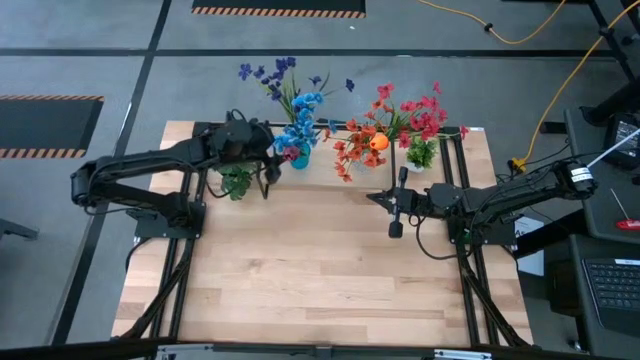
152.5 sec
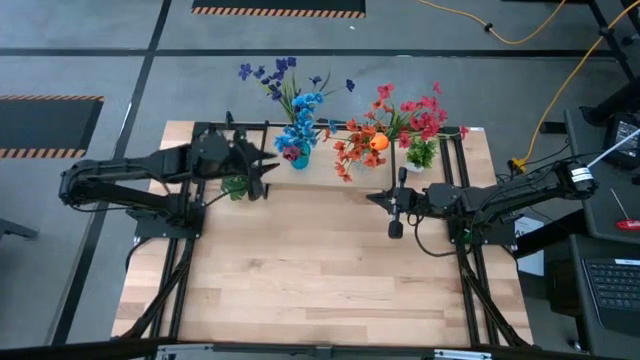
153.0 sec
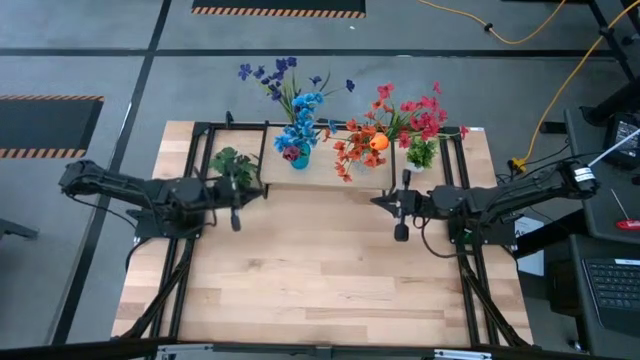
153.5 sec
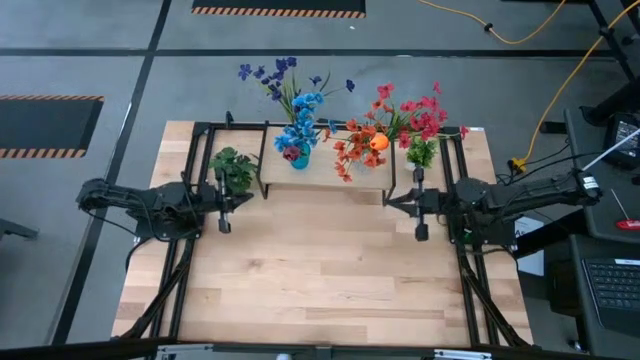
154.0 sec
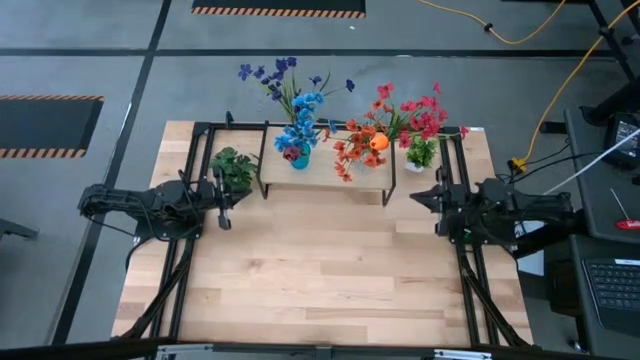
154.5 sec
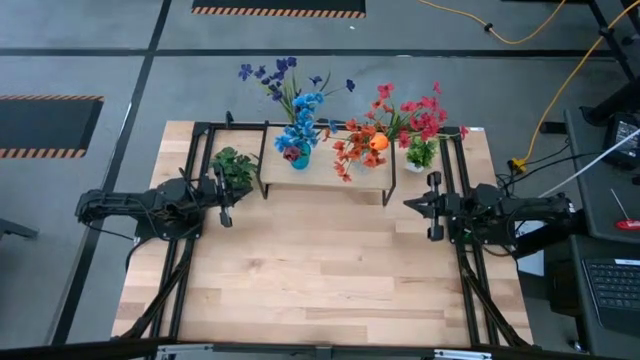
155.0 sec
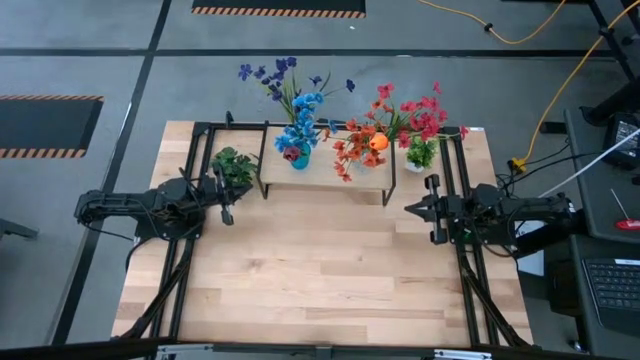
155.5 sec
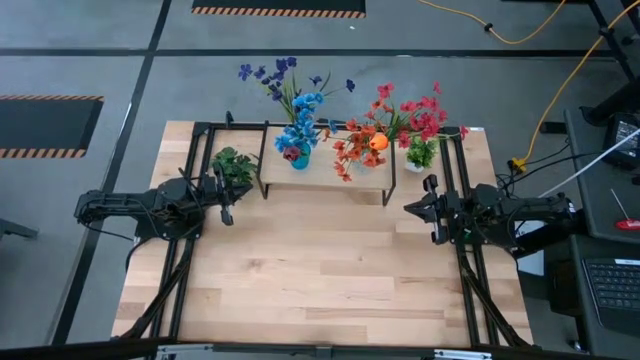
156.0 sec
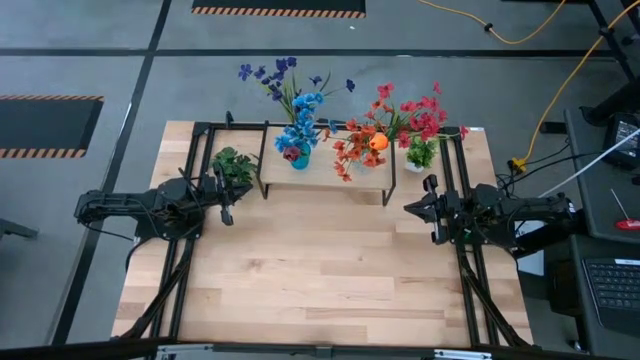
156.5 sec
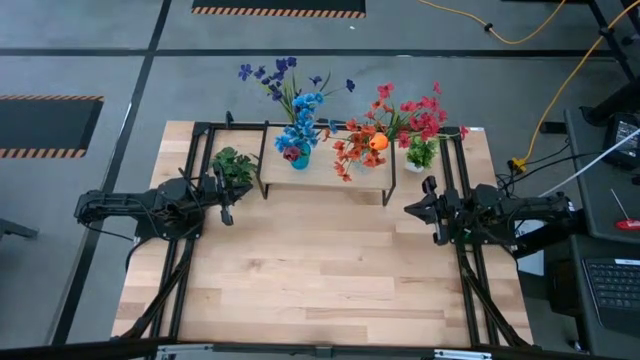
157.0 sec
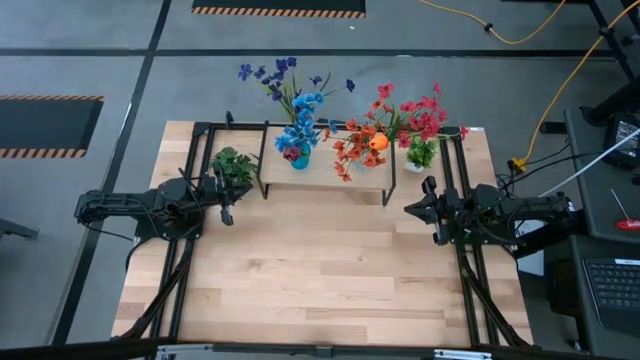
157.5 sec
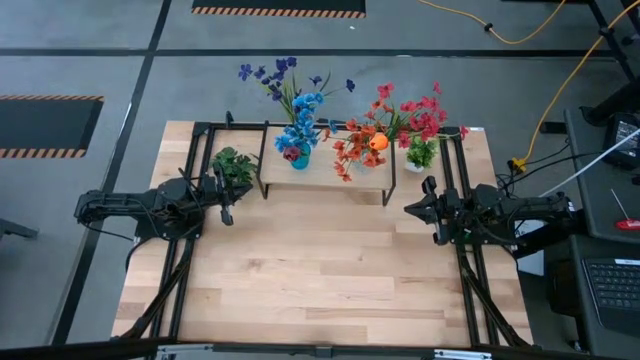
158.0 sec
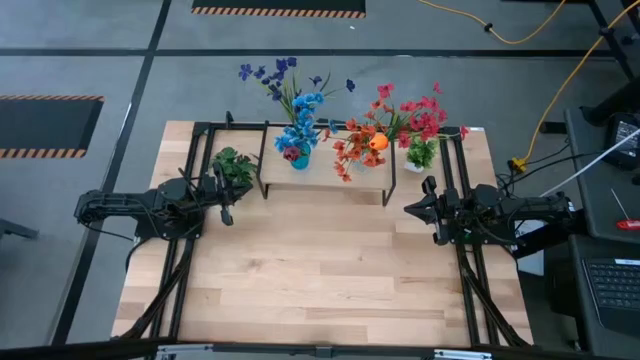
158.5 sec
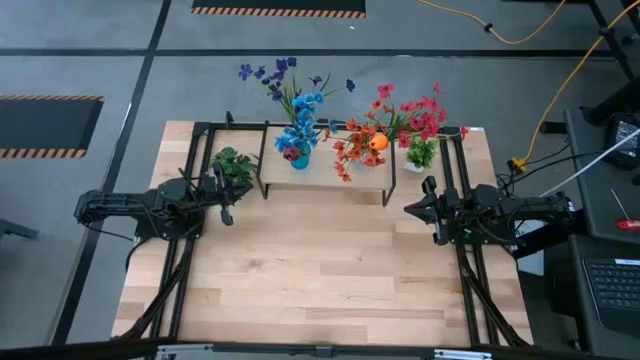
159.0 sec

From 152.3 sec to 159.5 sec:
Task: Pick and place flowers into a vace then onto a shelf
Return to Home Position

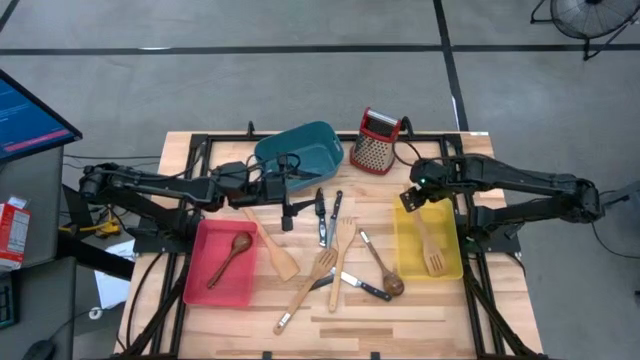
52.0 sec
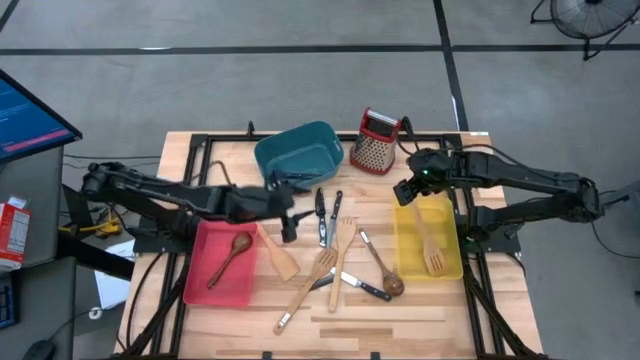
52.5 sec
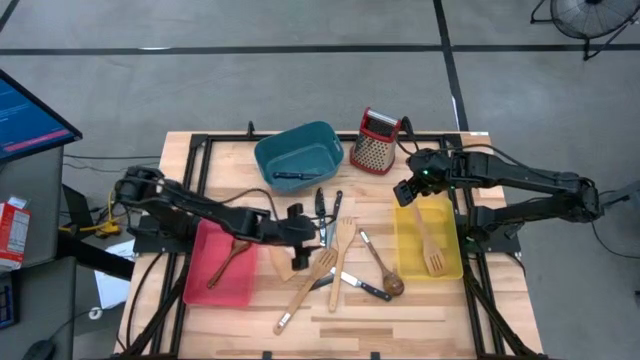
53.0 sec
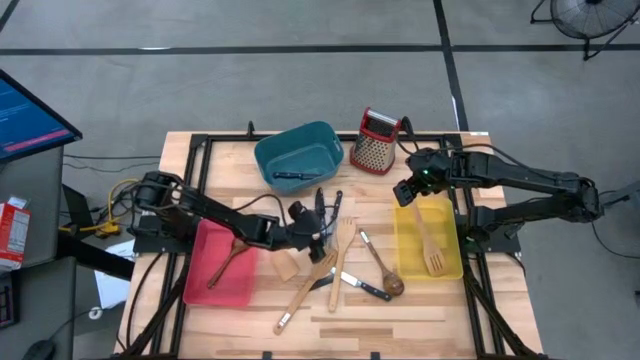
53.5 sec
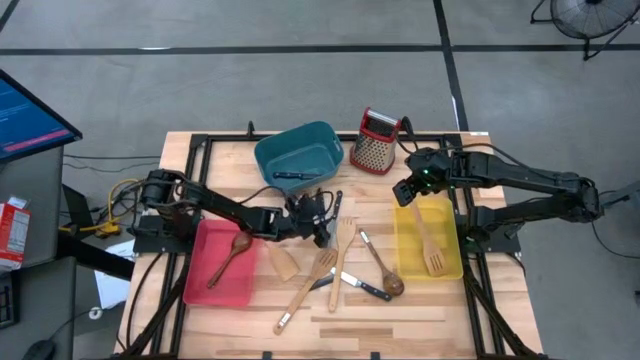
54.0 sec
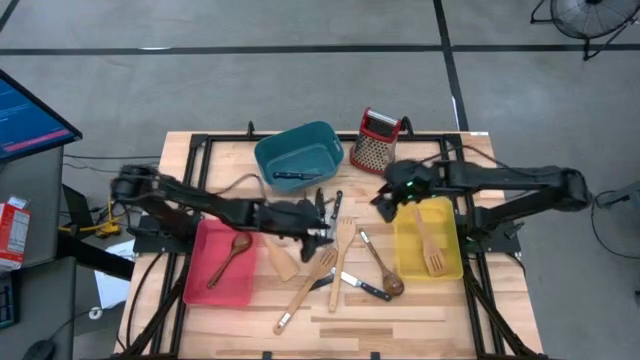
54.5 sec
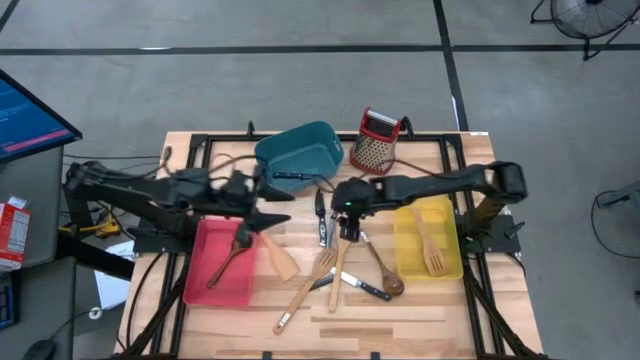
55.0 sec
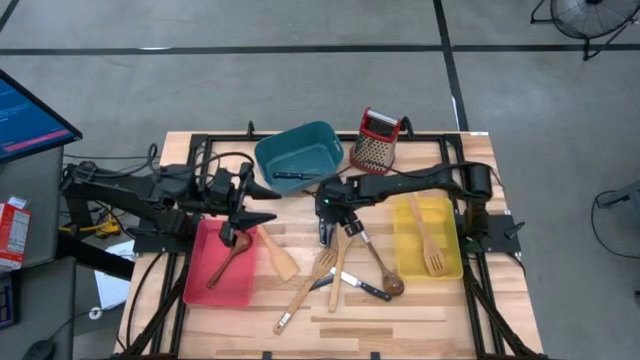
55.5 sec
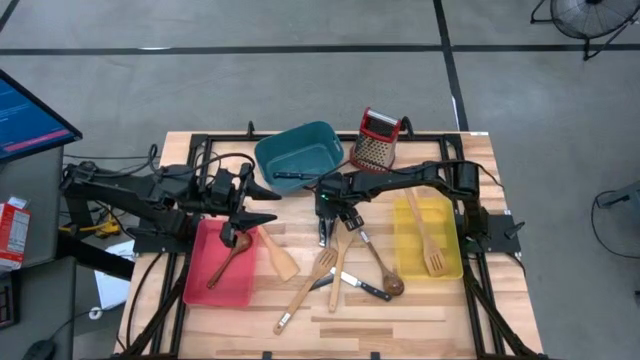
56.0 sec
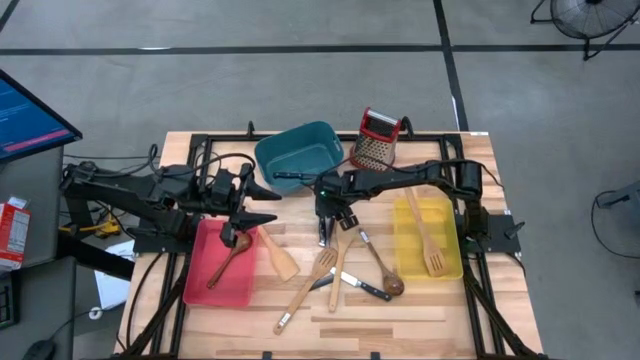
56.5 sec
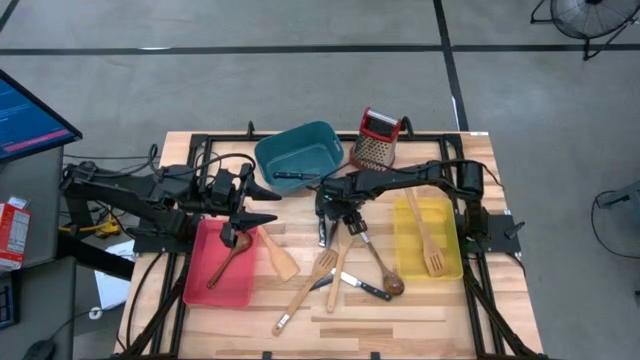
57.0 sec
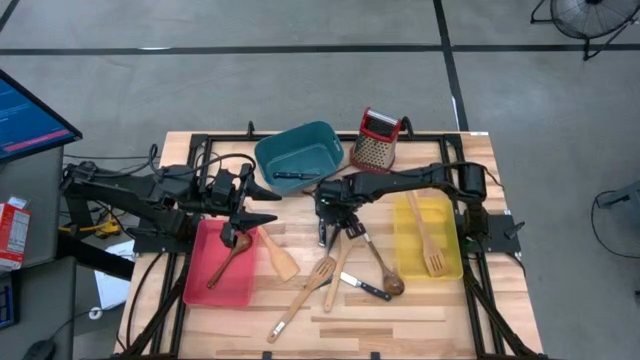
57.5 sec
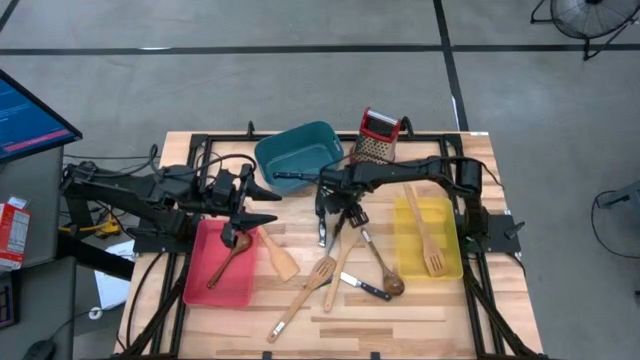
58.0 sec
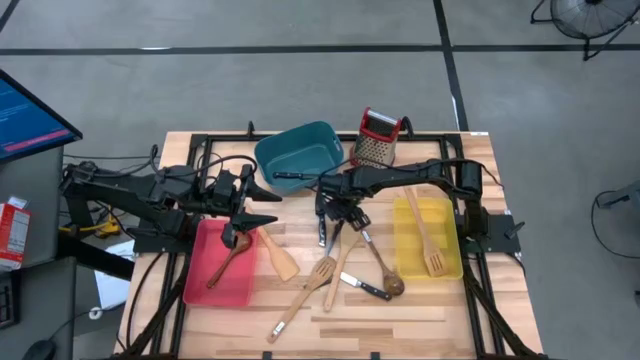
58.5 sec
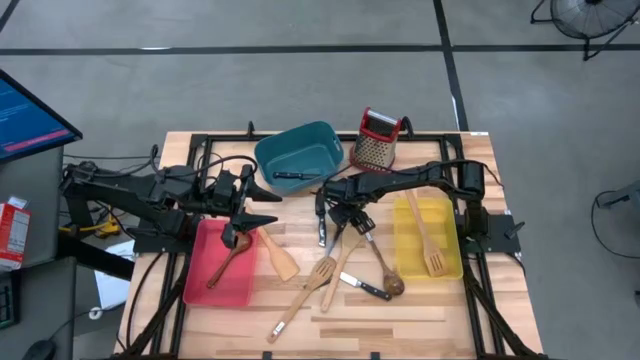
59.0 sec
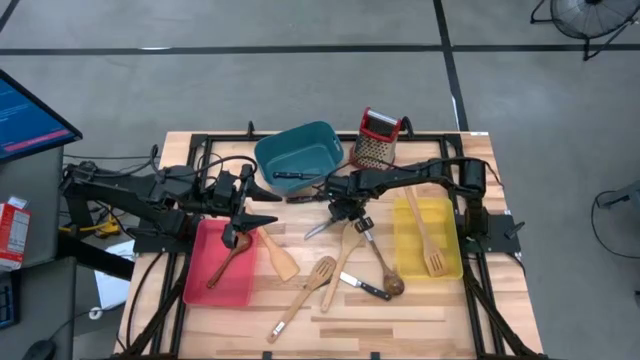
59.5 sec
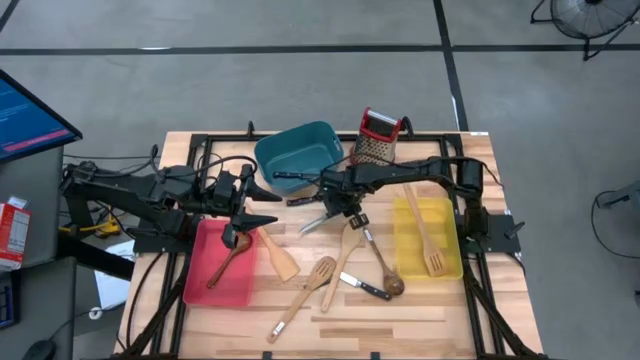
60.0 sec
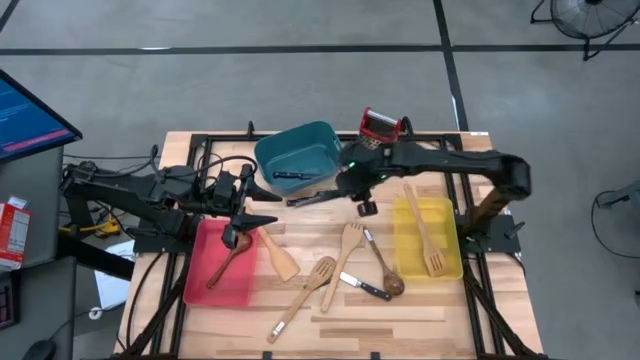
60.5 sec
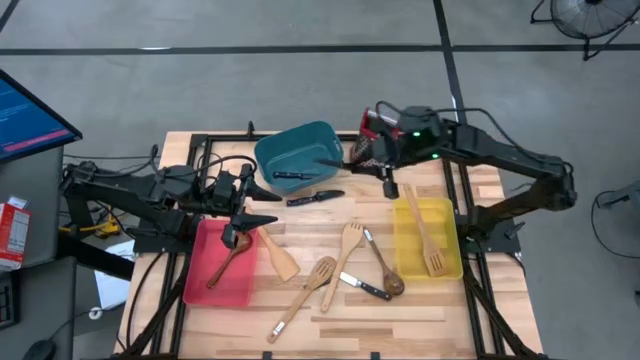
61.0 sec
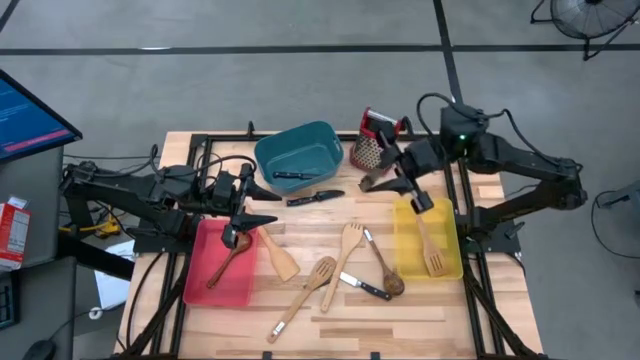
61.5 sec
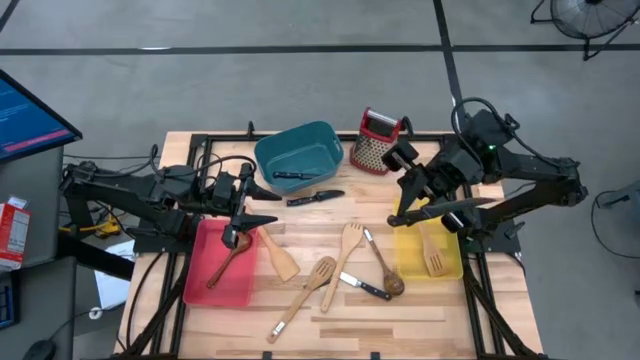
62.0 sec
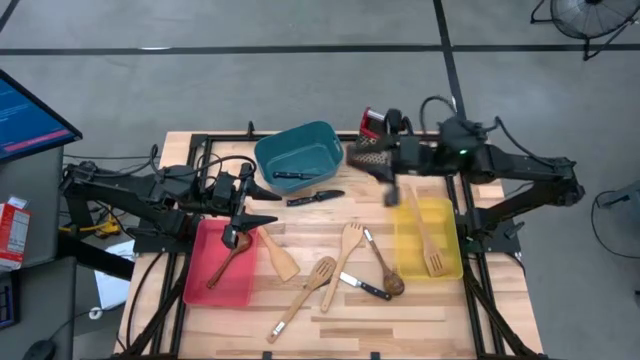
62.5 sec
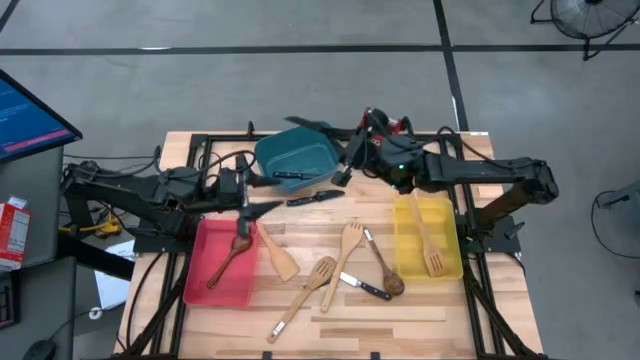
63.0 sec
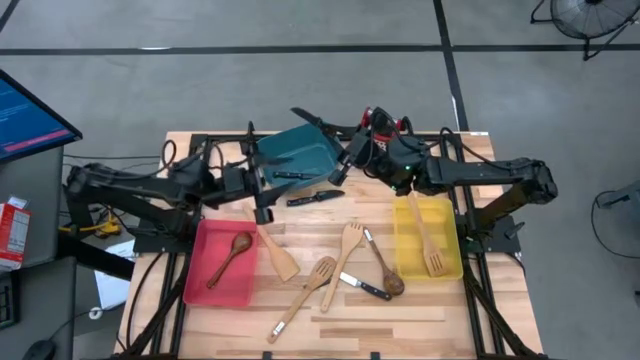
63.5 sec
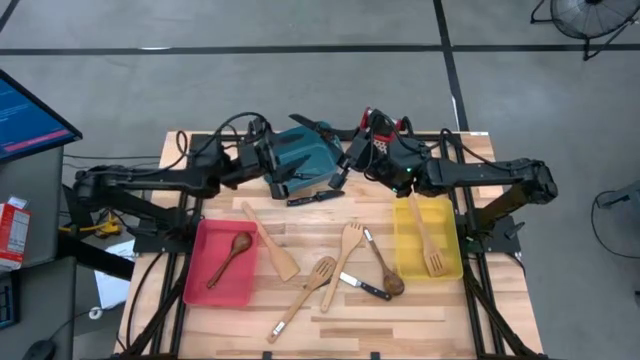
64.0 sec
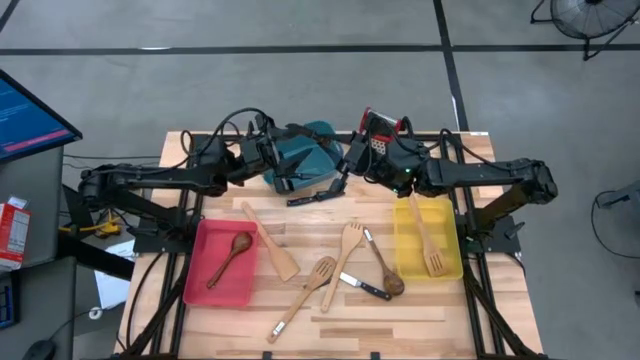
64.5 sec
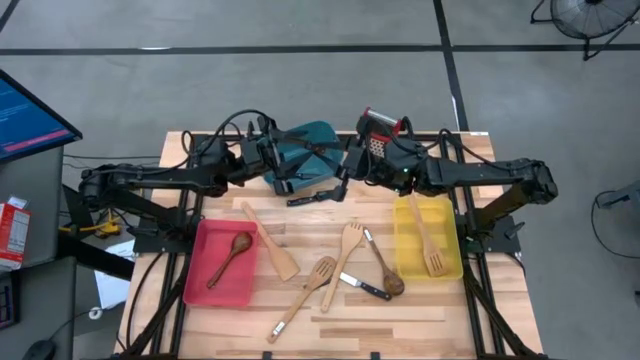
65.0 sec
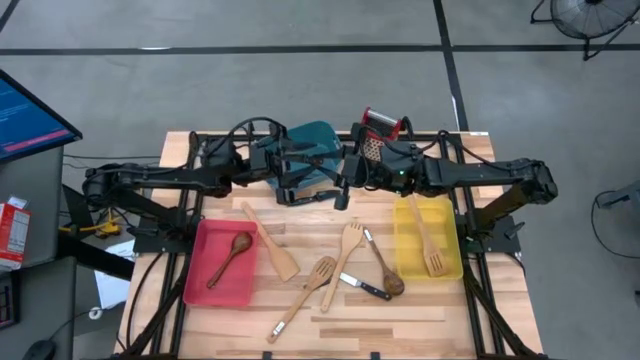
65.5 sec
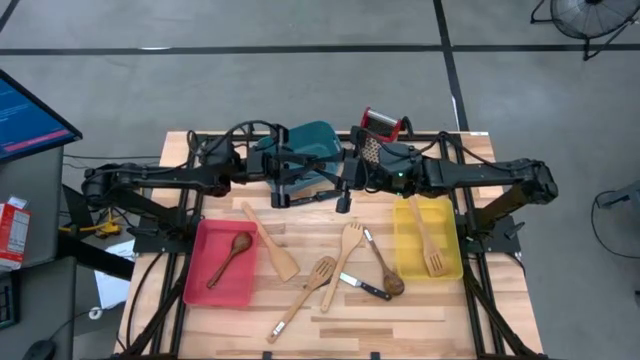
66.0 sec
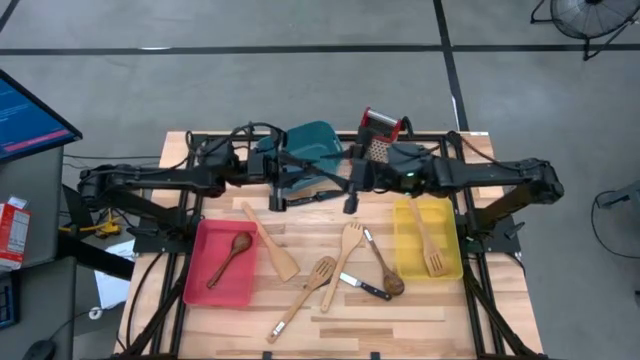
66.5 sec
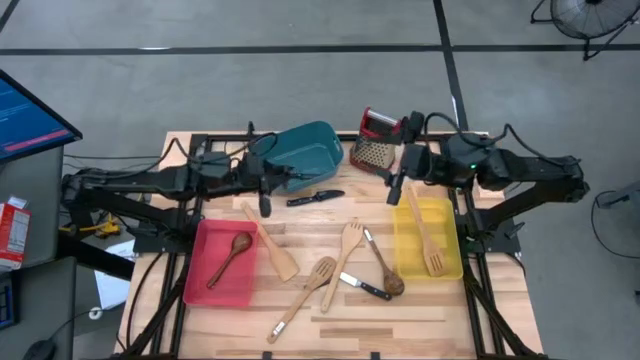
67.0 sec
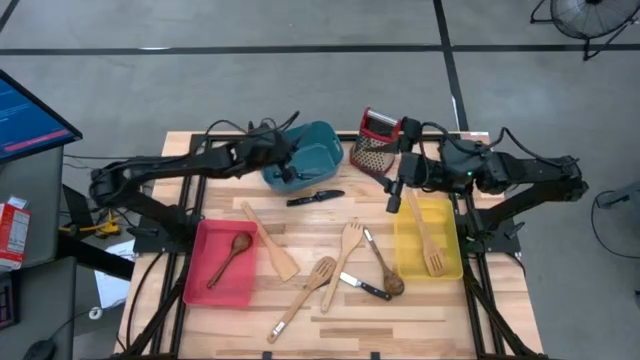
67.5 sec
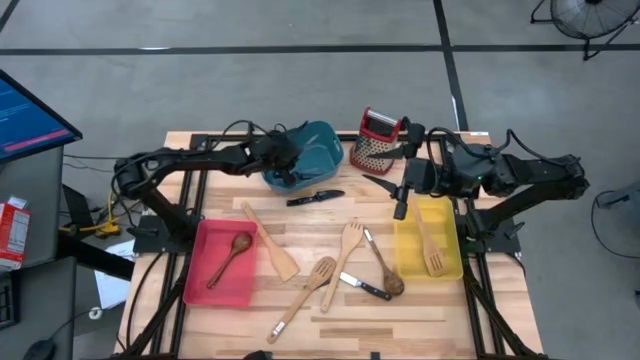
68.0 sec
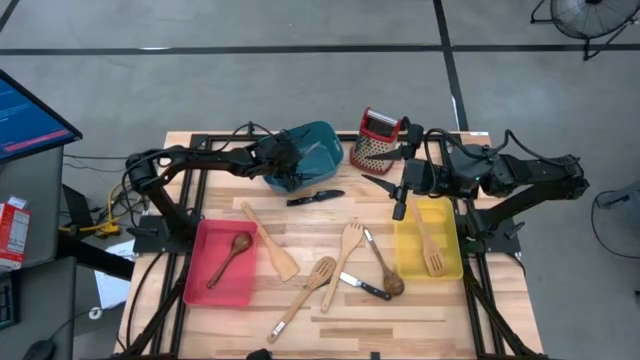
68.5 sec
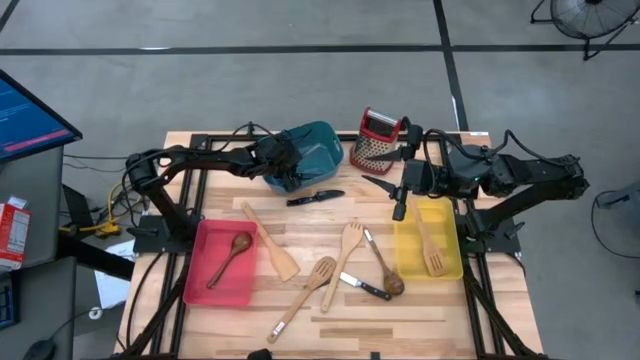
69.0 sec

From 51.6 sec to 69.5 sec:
Task: Pick & Place Kitchen Items
Put the black table knife into the blue bin
